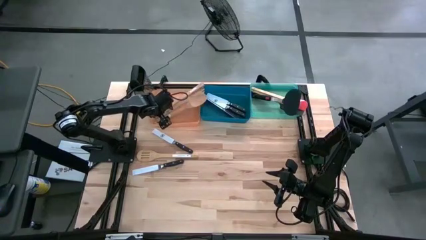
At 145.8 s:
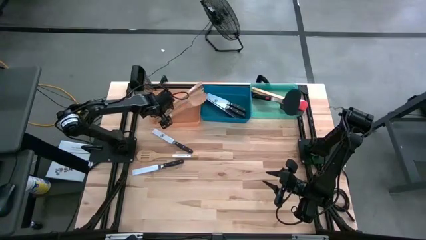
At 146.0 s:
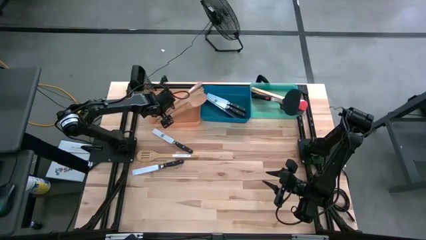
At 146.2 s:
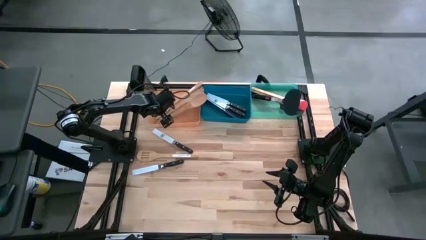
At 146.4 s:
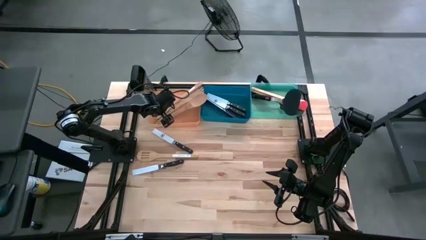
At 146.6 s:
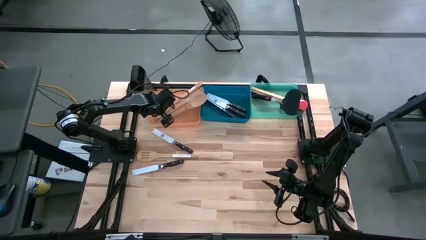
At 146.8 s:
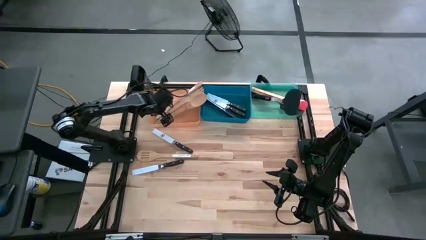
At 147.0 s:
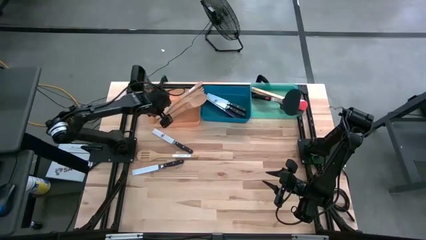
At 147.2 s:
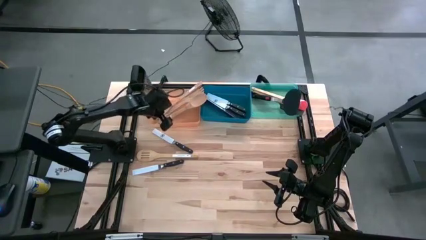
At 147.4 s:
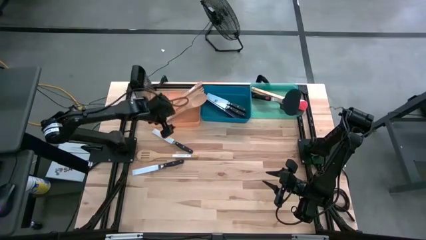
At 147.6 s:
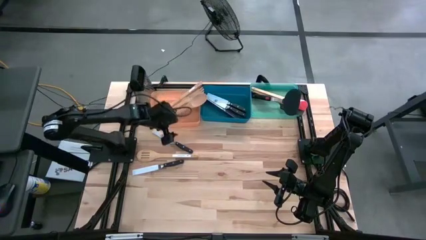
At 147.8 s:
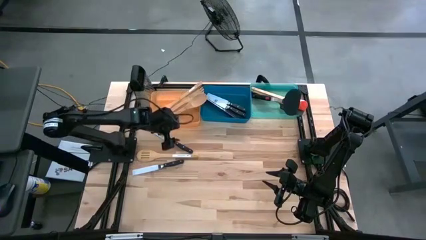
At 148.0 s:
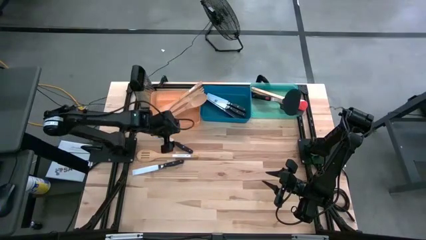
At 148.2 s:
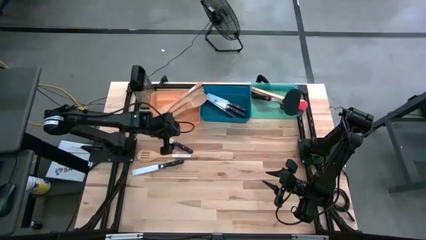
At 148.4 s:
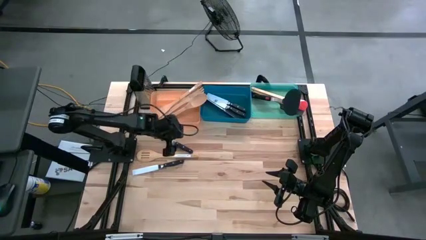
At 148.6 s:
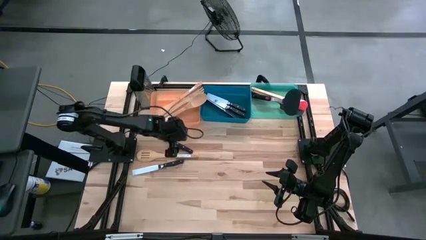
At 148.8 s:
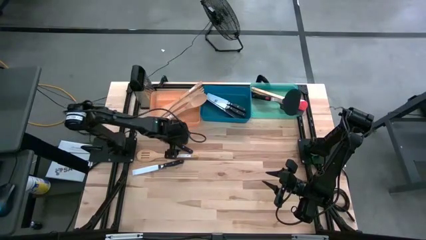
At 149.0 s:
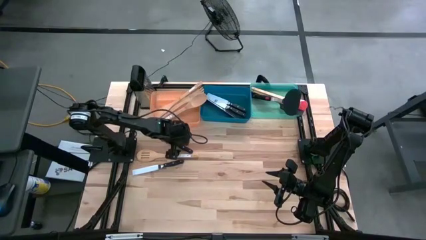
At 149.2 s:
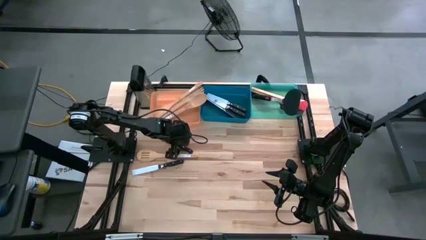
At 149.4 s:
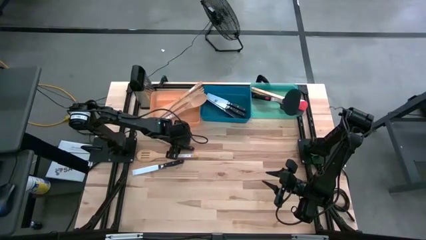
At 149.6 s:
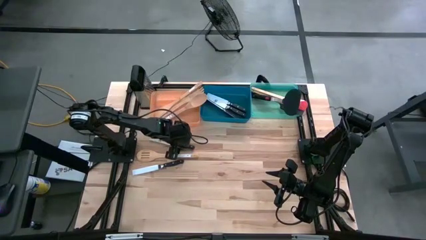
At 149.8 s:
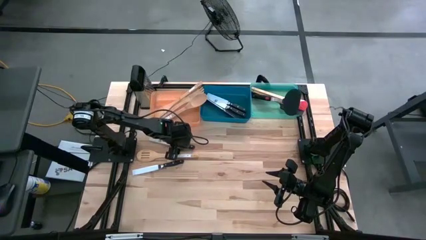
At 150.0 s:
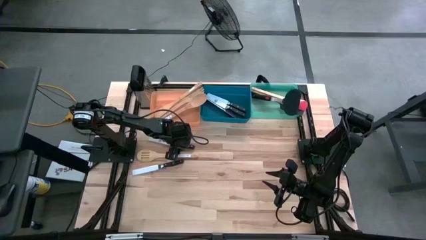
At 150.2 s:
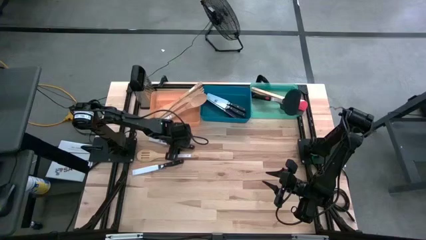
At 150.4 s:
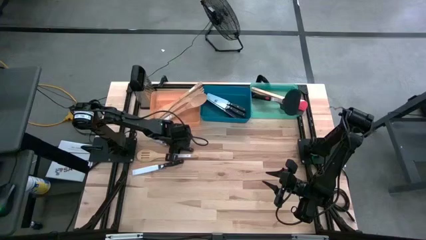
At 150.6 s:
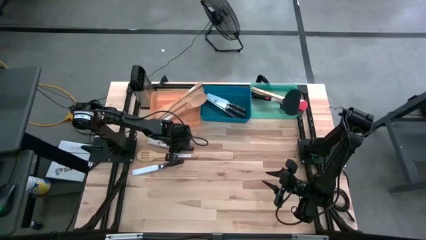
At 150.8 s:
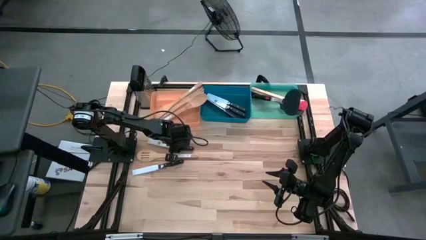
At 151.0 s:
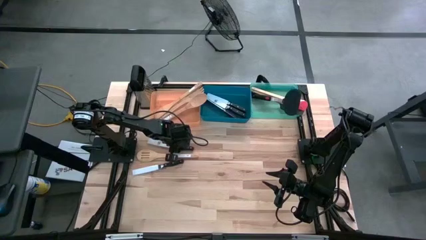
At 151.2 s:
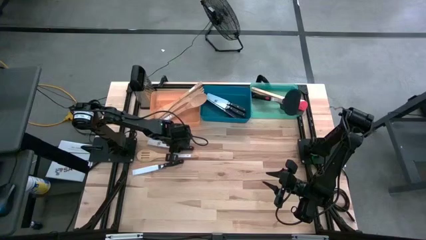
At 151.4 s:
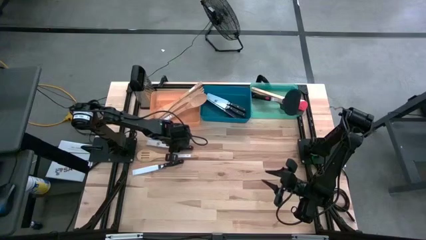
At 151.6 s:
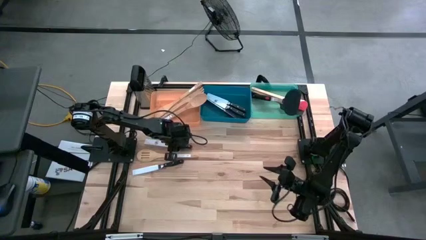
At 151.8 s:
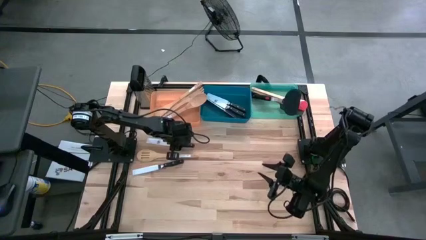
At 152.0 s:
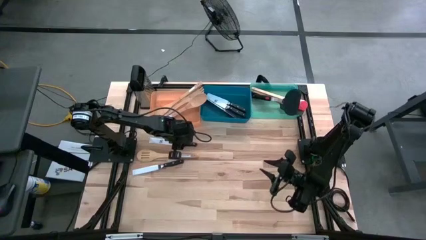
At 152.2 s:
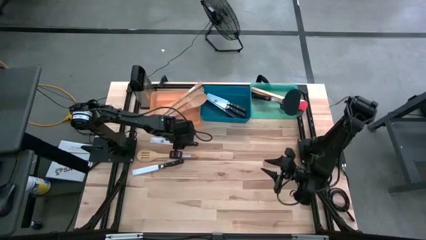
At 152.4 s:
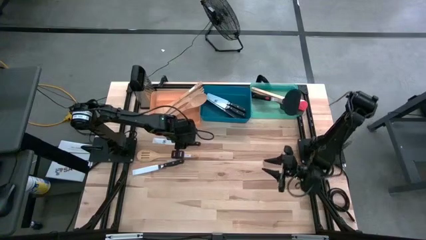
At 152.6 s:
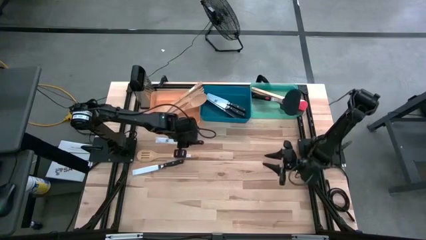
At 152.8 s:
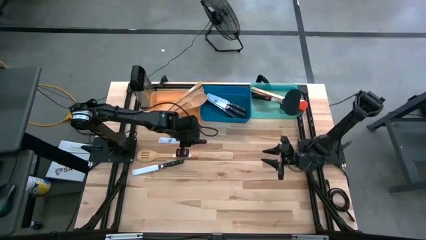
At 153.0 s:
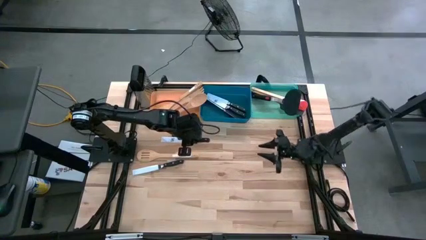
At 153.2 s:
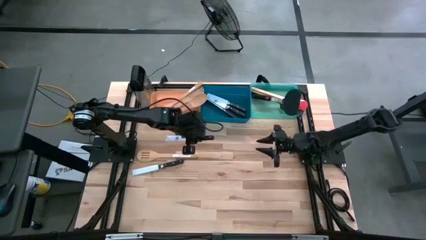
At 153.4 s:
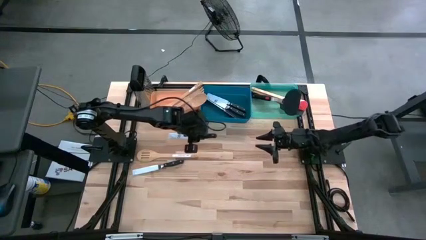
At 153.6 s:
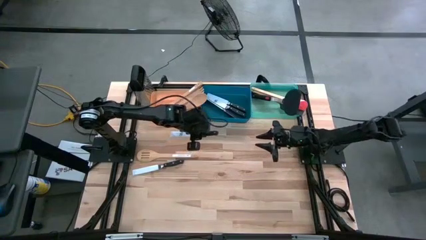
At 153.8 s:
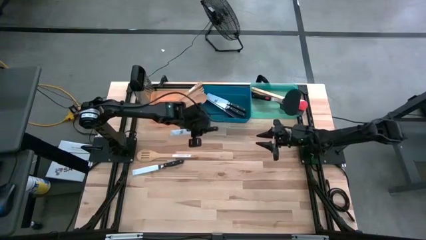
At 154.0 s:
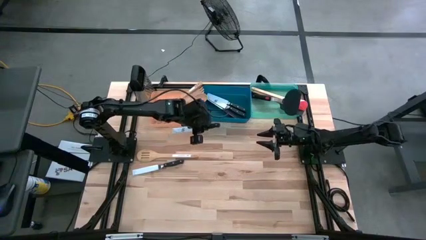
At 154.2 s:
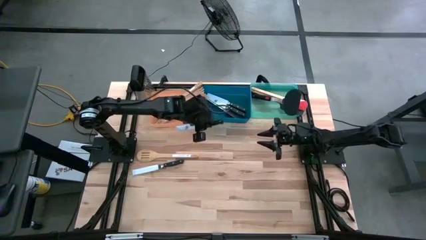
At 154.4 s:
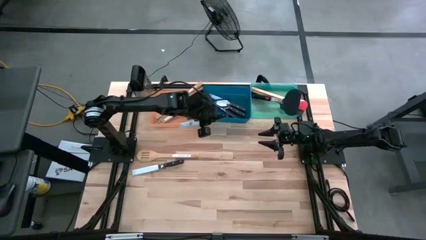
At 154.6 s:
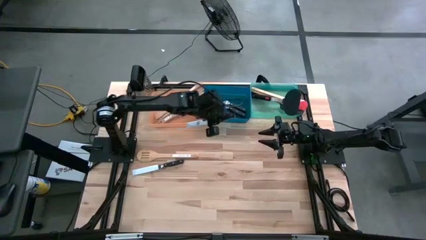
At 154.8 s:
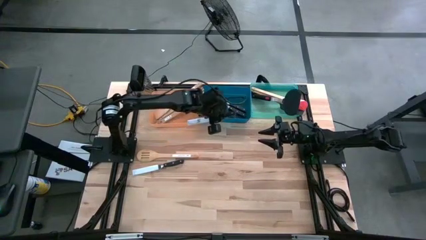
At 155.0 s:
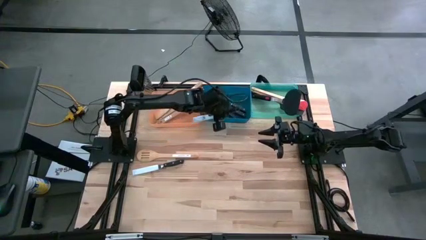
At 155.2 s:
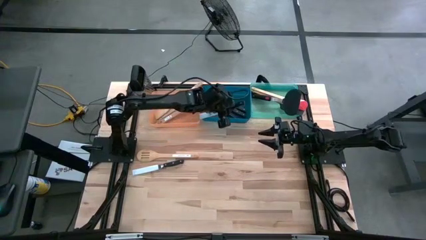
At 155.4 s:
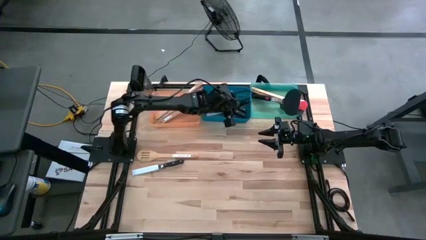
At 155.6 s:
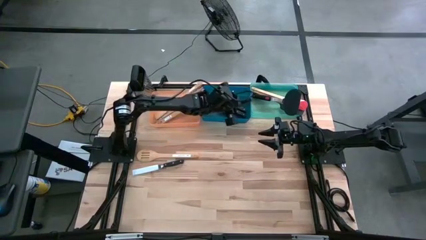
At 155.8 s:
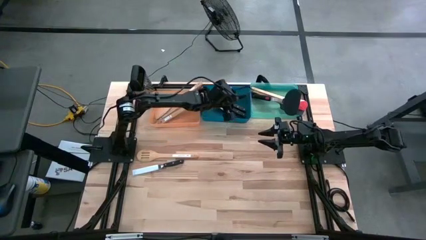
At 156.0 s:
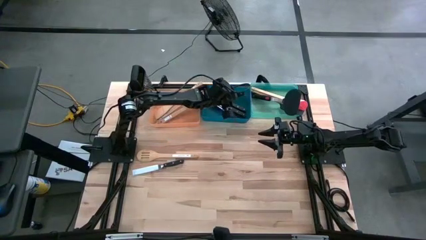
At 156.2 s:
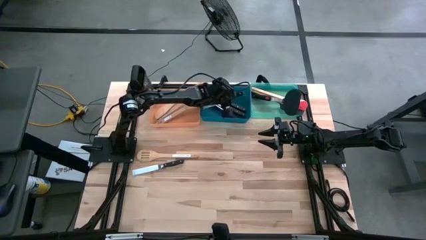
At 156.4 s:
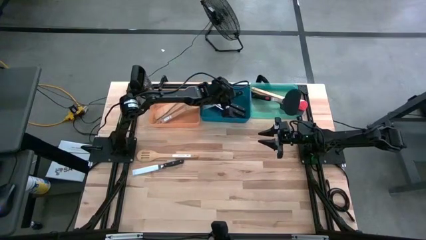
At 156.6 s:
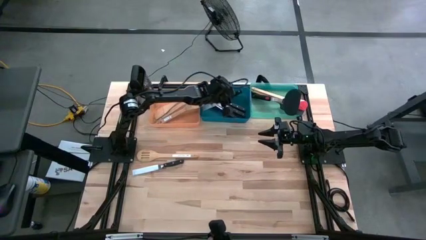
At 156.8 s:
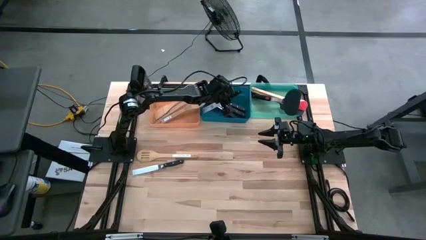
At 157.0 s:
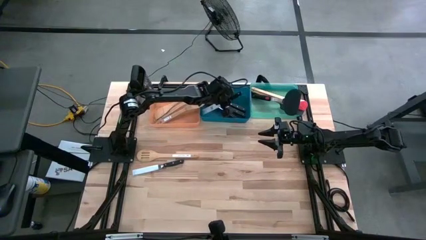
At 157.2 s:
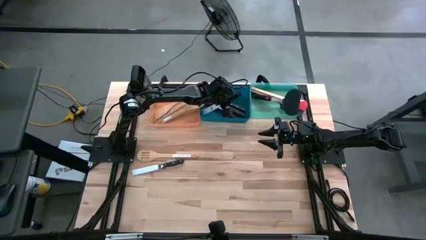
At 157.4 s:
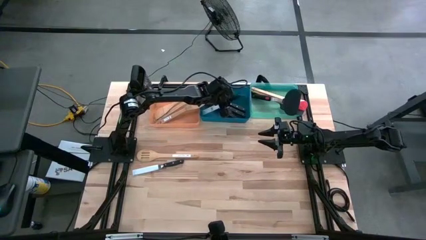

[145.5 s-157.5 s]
Task: Pick & Place Kitchen Items
Put the knife into the blue bin

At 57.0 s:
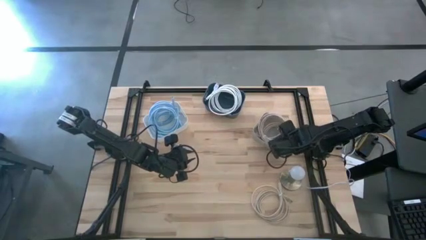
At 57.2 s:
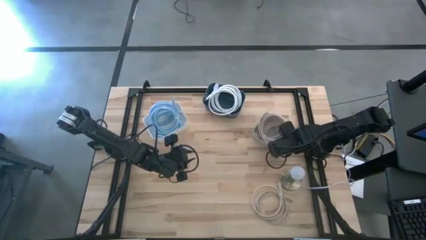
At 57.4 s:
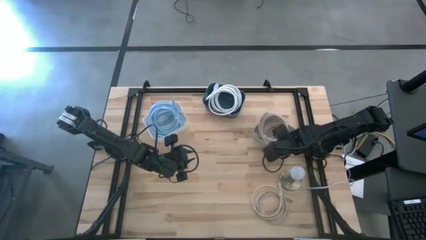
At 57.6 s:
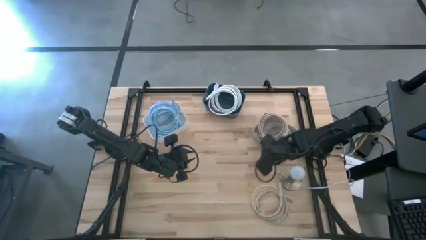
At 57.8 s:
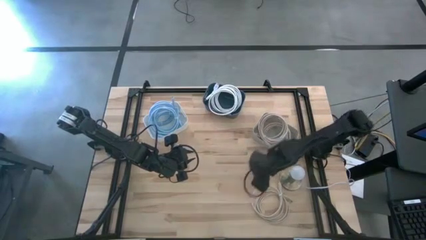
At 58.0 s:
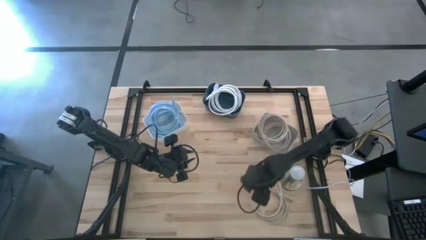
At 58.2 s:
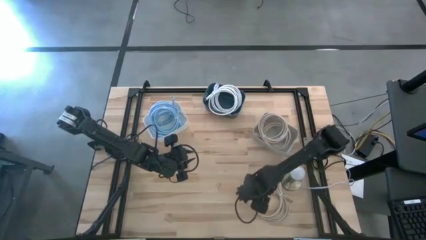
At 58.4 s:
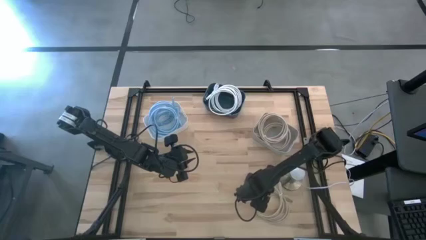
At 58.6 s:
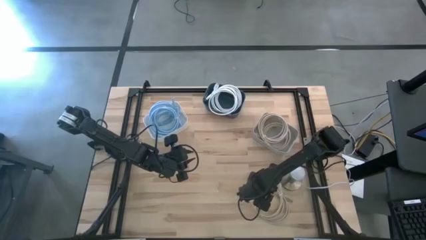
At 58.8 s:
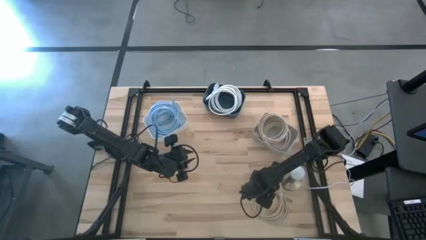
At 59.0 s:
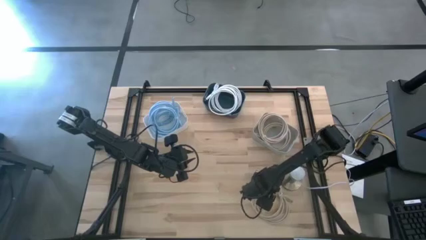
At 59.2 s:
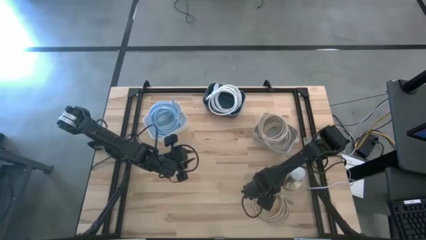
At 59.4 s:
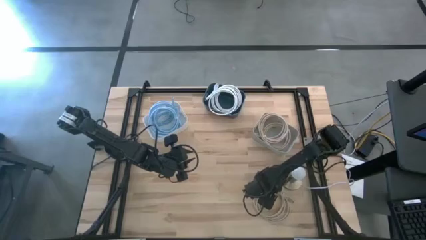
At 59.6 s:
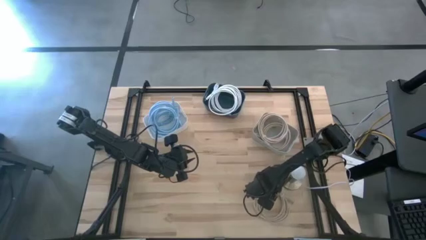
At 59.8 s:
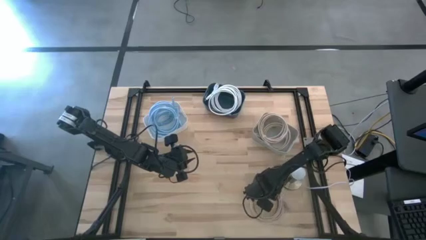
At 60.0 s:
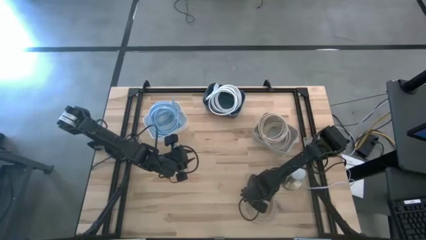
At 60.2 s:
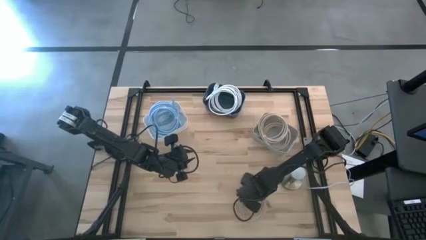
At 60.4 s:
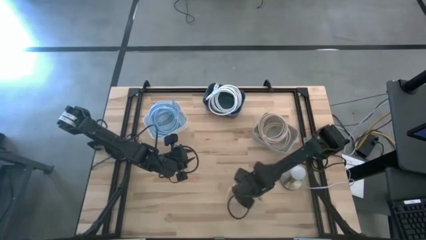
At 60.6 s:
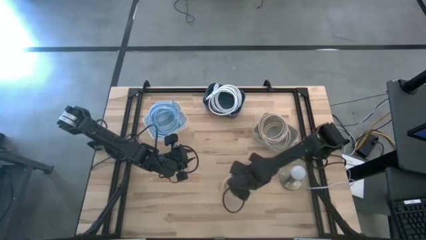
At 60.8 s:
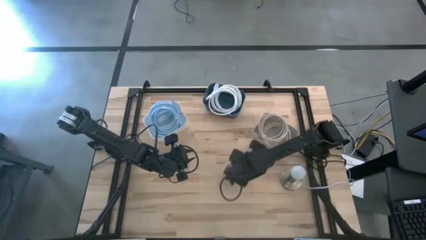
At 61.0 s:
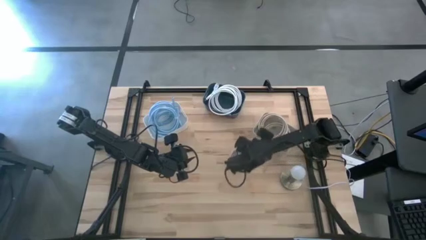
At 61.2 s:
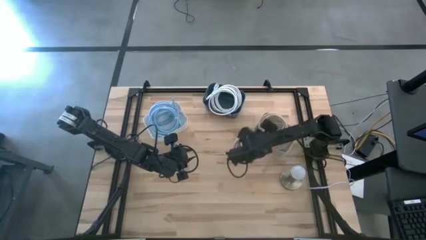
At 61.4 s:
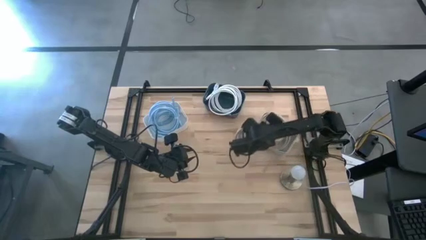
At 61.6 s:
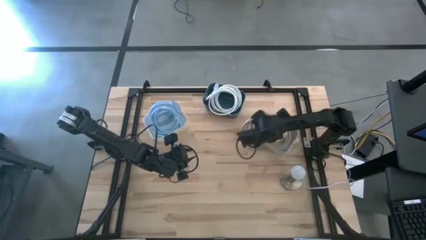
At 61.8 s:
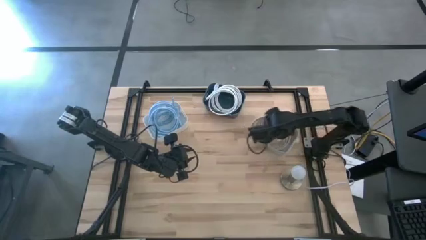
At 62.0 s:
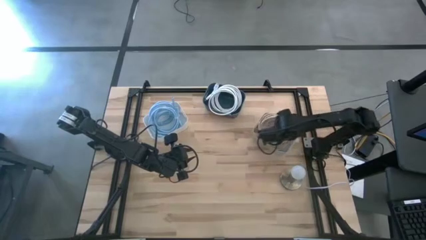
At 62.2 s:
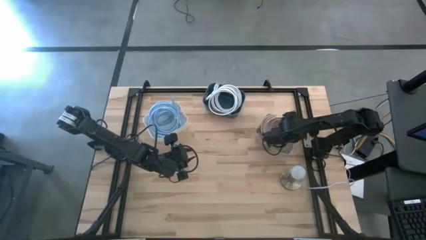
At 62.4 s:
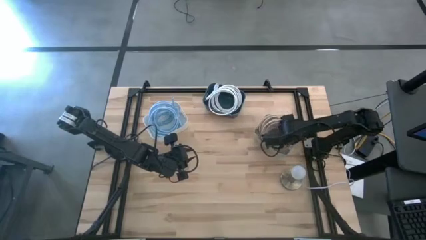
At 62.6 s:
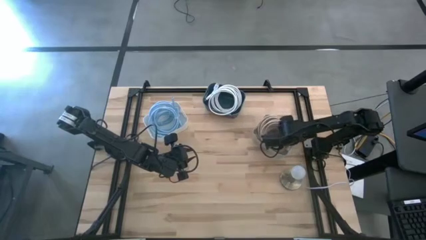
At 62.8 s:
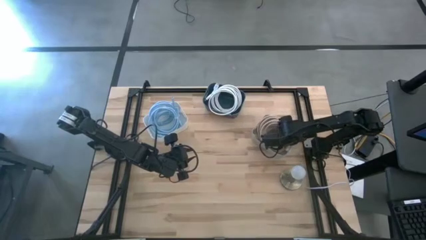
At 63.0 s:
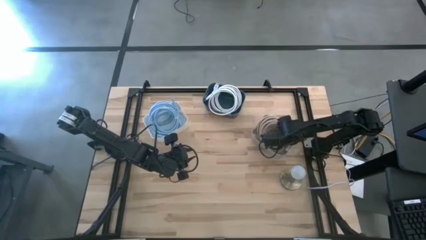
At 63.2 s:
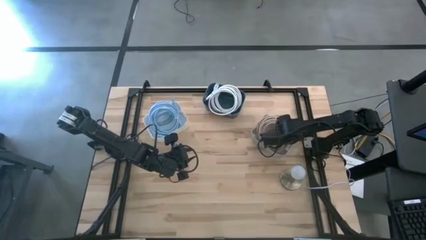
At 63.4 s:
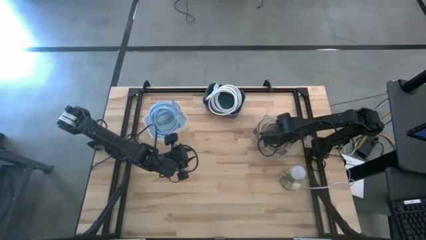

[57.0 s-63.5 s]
Task: Pick & Place USB Port
Put the light brown usb cable into the gray bin
